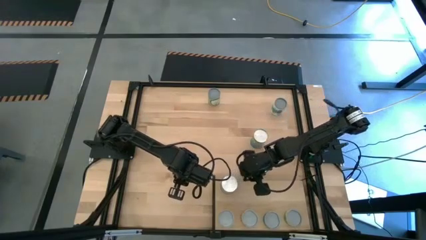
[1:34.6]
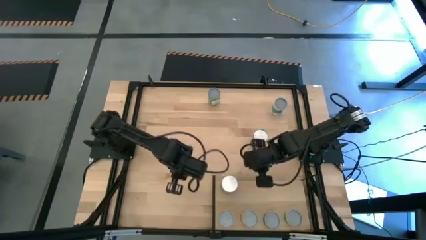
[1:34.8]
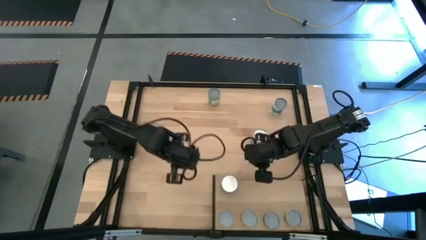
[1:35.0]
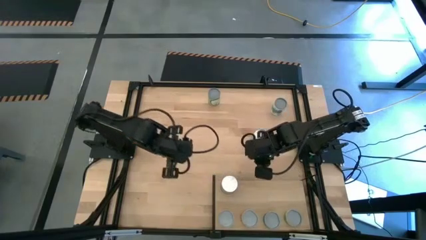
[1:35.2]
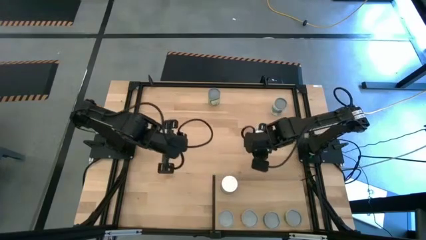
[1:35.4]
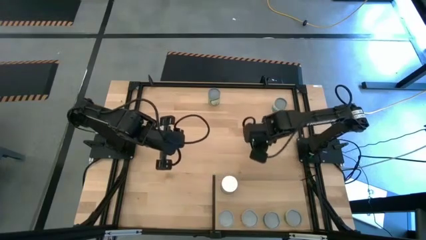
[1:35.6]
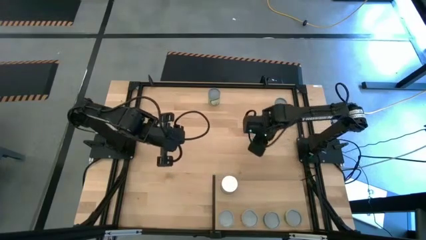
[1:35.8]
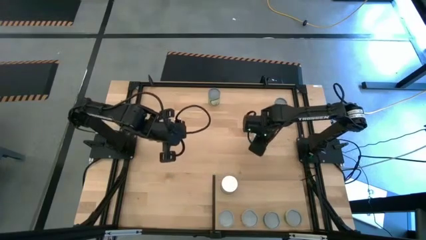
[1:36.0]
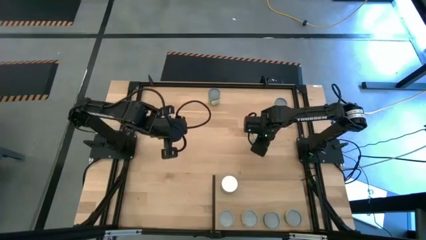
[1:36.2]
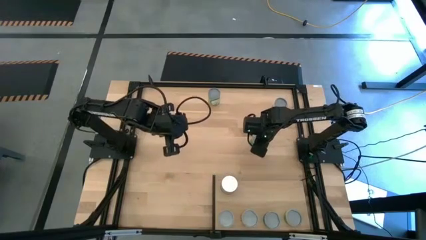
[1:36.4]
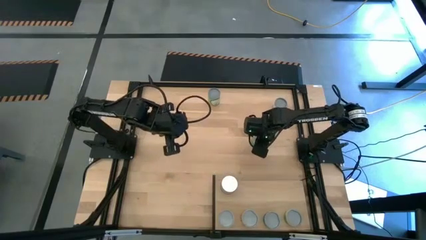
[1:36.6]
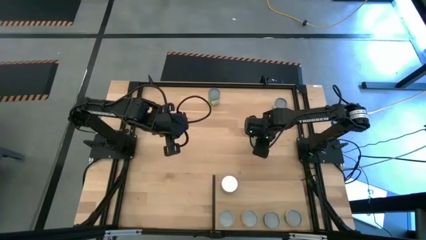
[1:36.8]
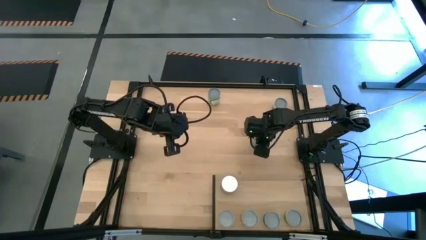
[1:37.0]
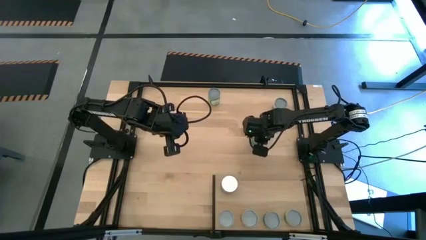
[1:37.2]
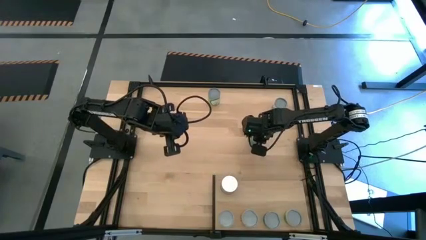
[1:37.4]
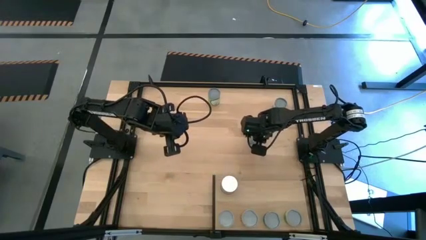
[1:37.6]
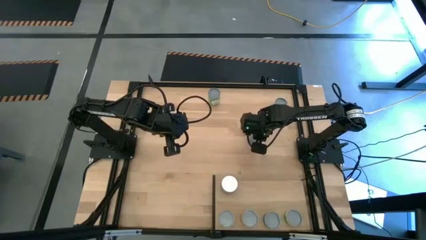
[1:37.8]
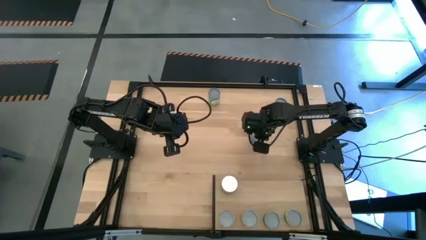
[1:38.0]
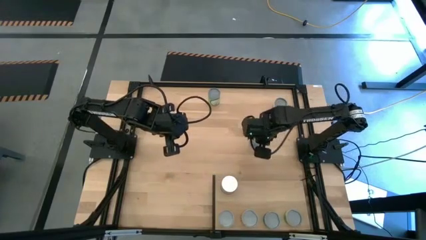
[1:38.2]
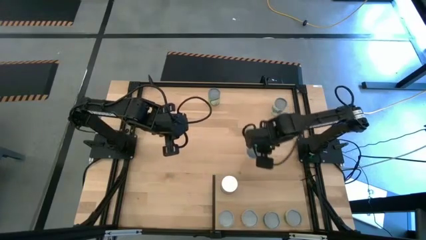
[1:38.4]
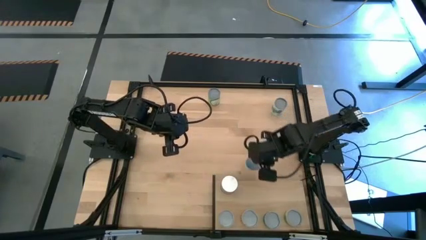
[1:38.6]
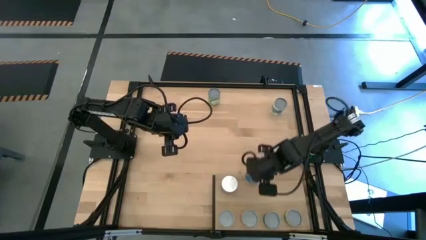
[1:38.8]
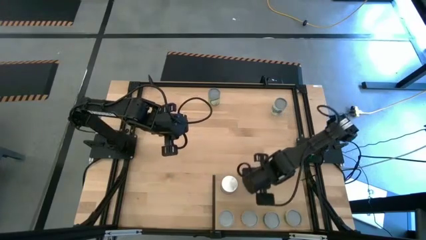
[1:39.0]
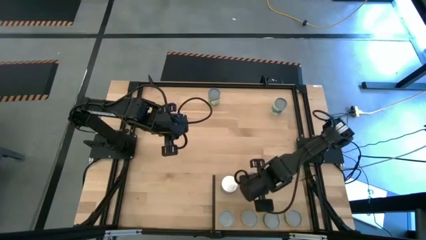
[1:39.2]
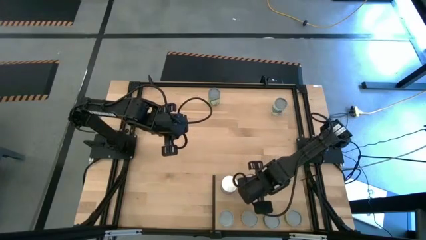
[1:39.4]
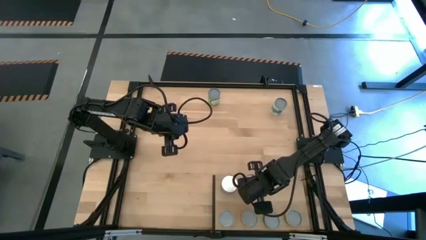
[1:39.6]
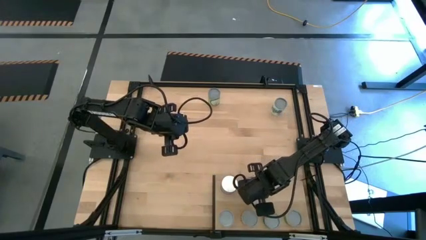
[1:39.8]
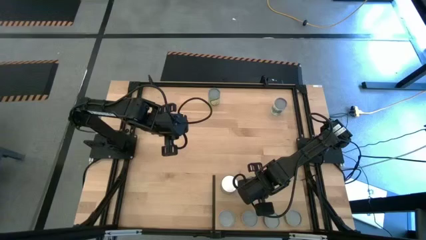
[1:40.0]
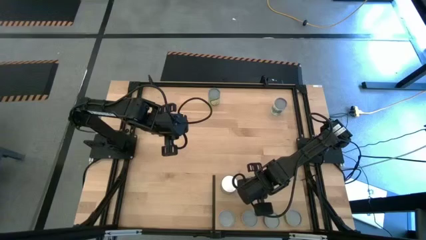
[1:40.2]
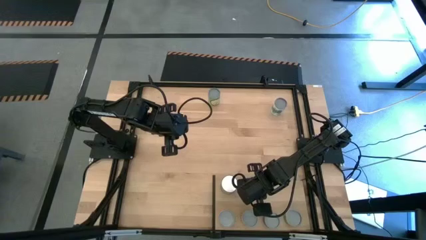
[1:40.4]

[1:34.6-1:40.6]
Task: Pick and place cans onto a shelf
Put the canned cherries on the shelf

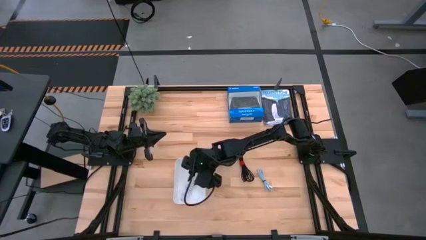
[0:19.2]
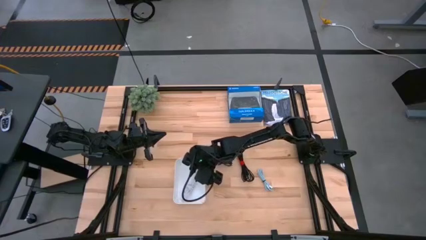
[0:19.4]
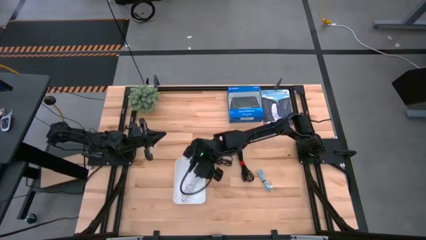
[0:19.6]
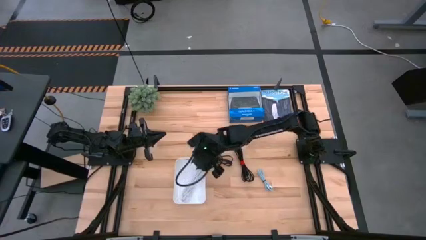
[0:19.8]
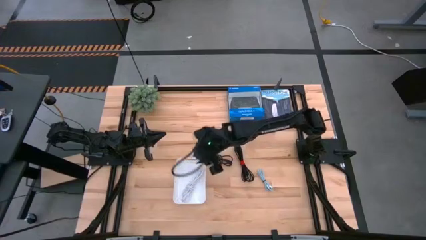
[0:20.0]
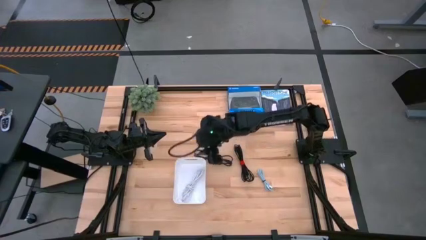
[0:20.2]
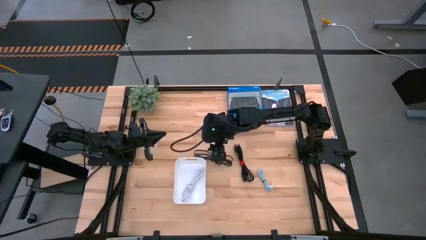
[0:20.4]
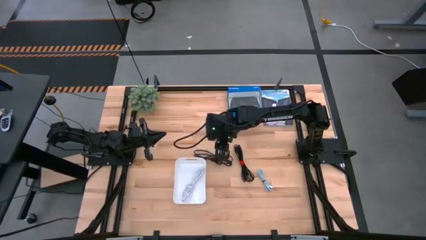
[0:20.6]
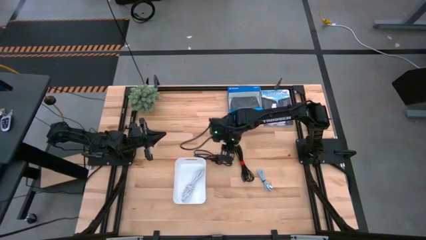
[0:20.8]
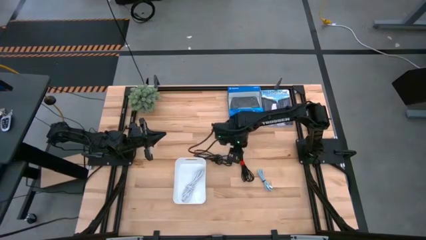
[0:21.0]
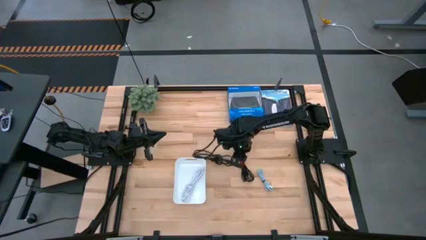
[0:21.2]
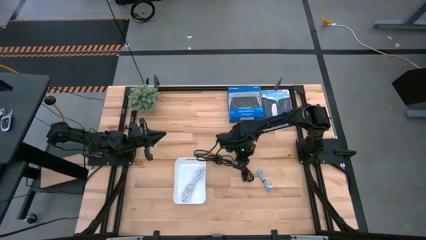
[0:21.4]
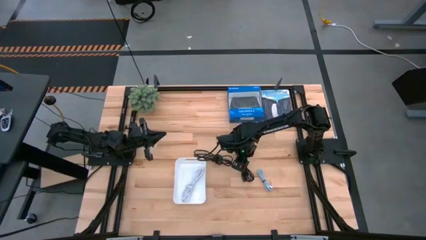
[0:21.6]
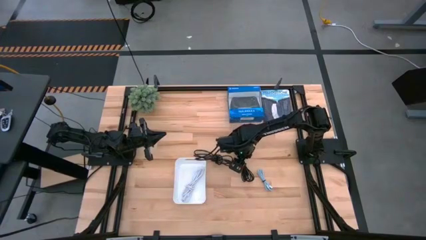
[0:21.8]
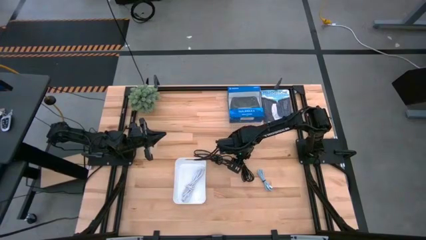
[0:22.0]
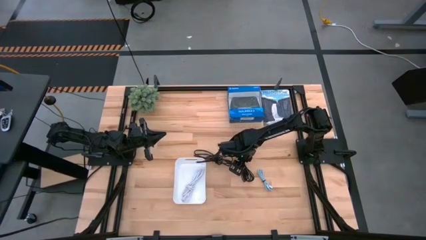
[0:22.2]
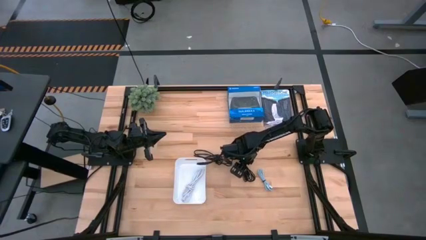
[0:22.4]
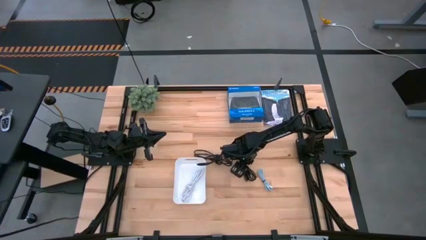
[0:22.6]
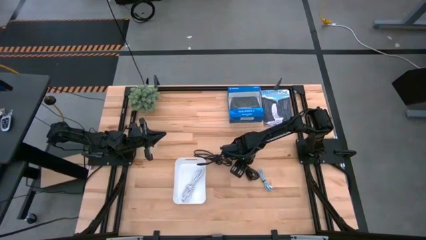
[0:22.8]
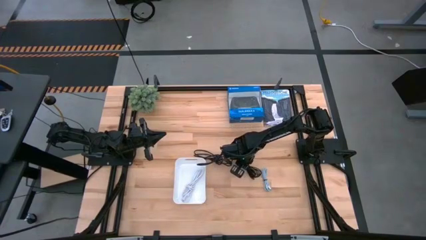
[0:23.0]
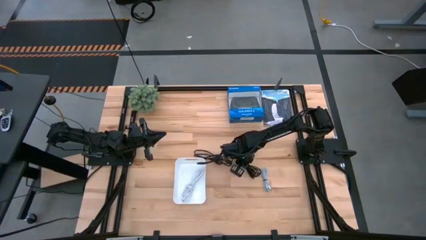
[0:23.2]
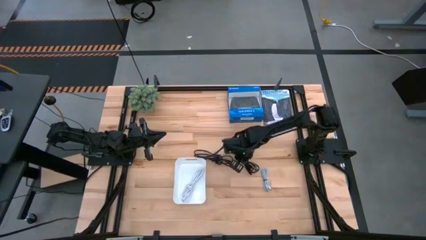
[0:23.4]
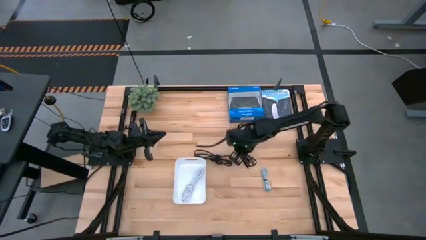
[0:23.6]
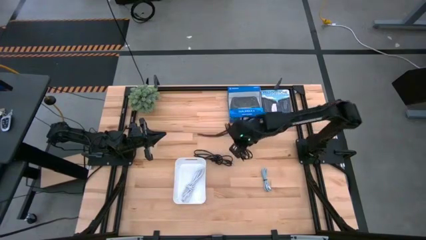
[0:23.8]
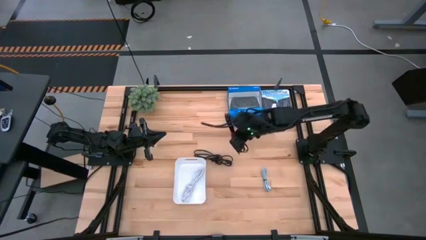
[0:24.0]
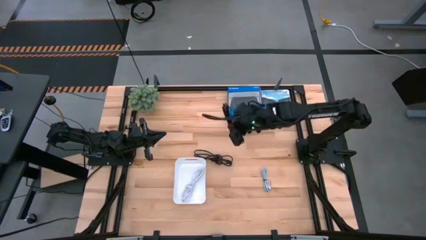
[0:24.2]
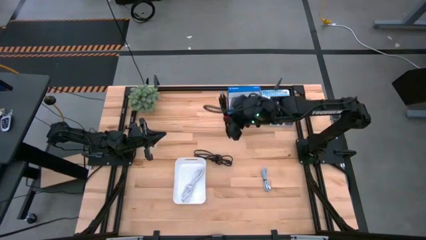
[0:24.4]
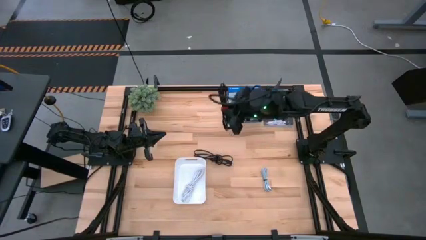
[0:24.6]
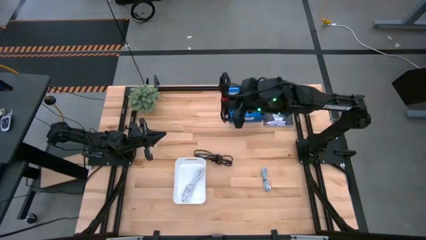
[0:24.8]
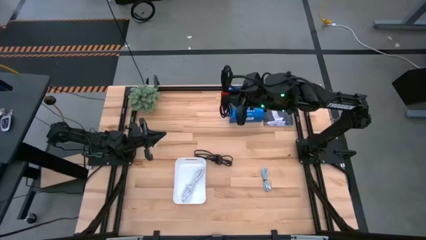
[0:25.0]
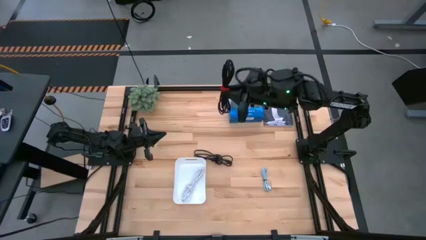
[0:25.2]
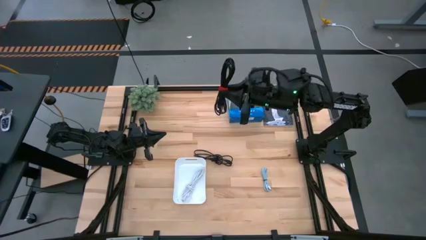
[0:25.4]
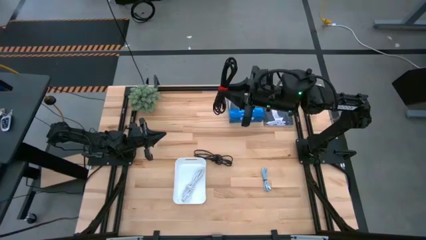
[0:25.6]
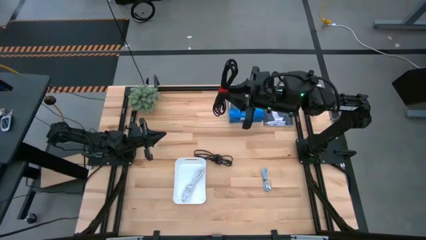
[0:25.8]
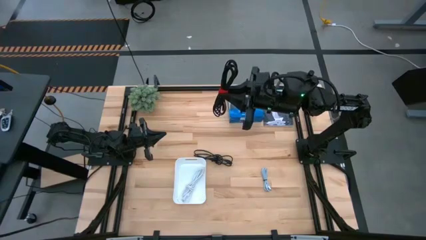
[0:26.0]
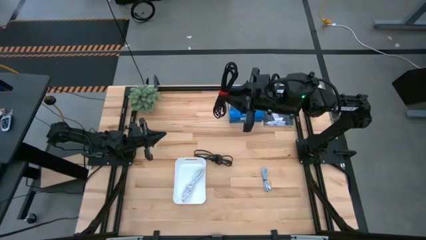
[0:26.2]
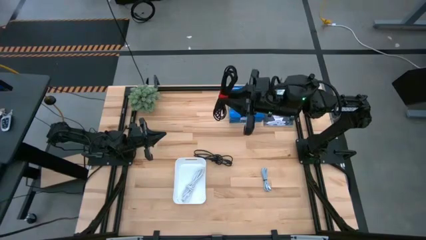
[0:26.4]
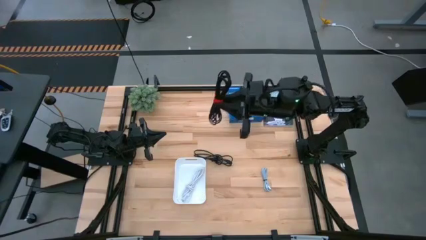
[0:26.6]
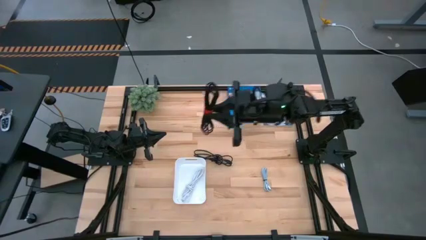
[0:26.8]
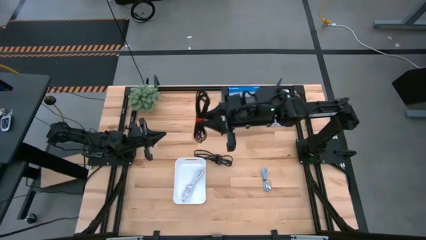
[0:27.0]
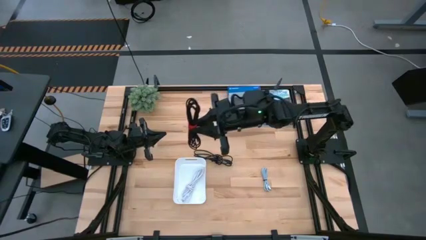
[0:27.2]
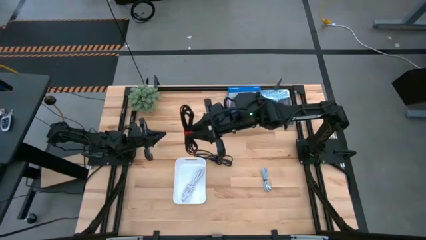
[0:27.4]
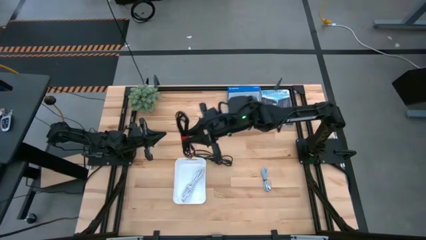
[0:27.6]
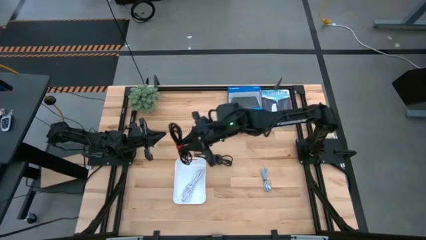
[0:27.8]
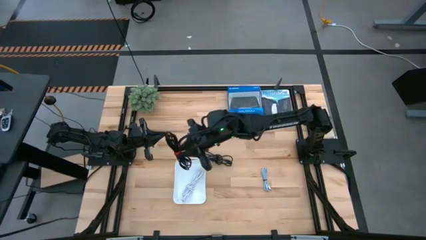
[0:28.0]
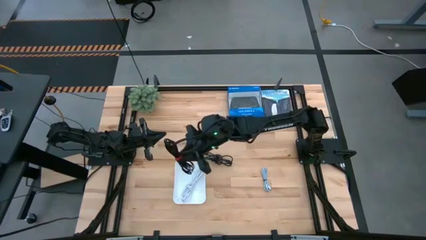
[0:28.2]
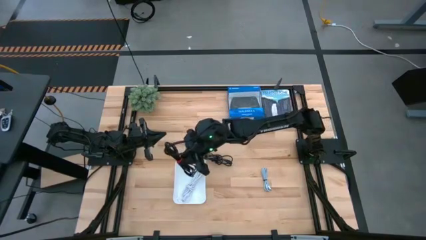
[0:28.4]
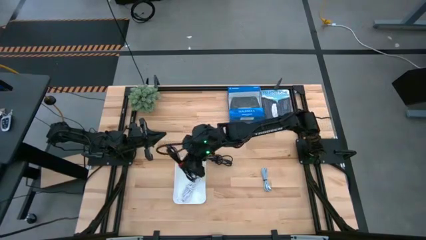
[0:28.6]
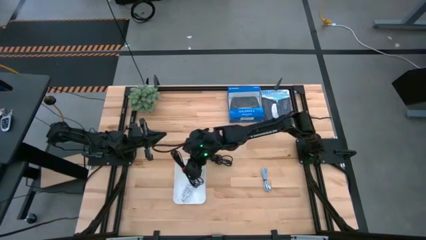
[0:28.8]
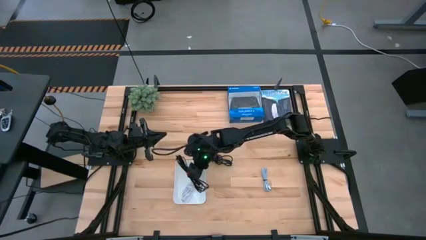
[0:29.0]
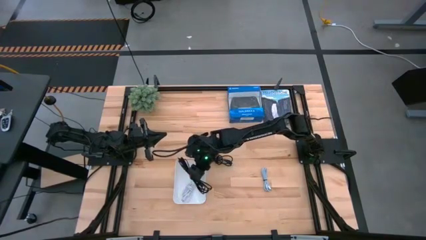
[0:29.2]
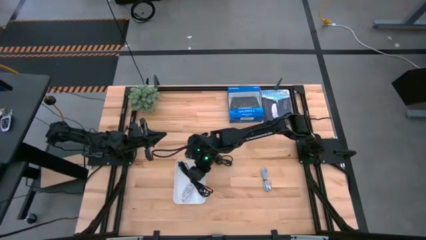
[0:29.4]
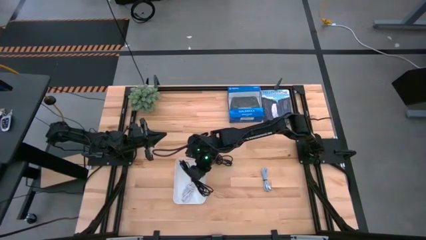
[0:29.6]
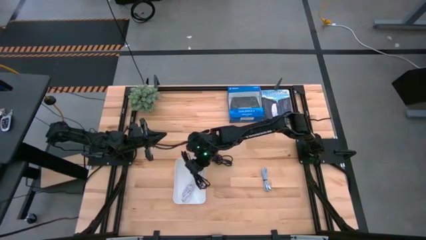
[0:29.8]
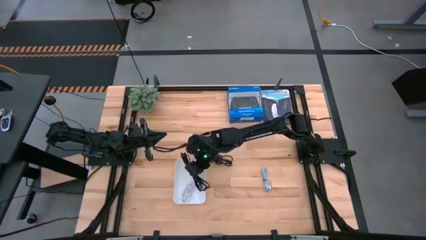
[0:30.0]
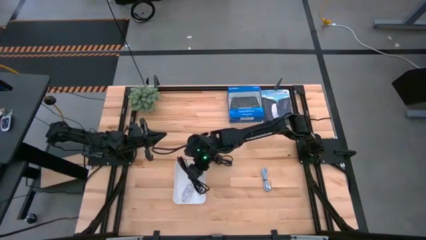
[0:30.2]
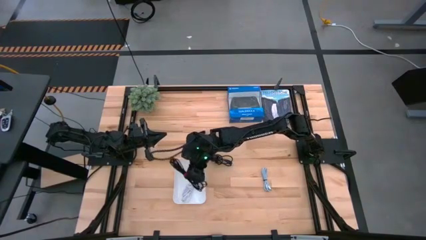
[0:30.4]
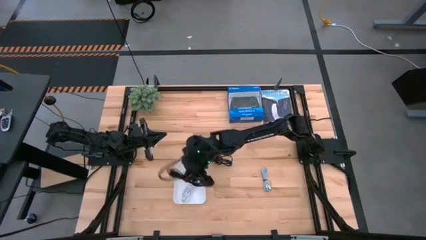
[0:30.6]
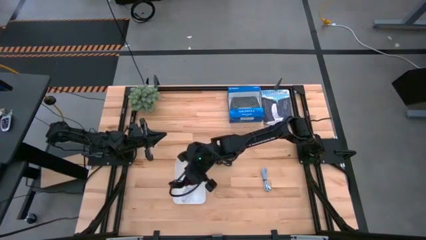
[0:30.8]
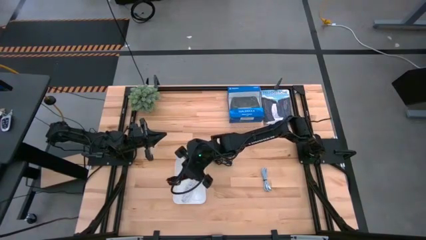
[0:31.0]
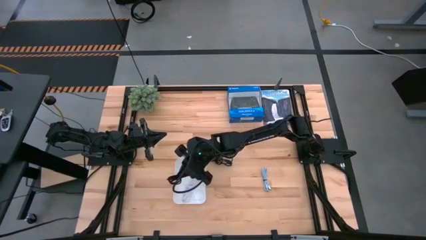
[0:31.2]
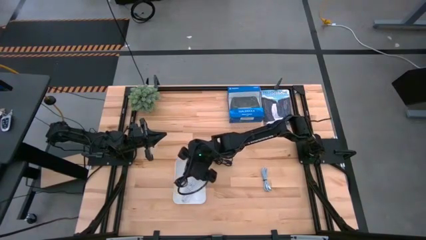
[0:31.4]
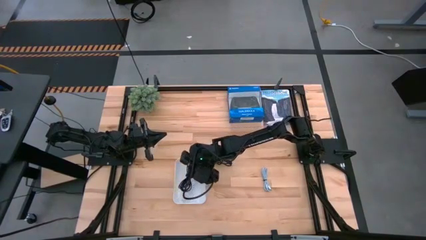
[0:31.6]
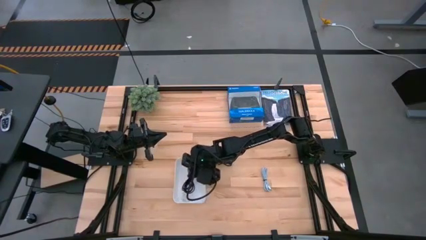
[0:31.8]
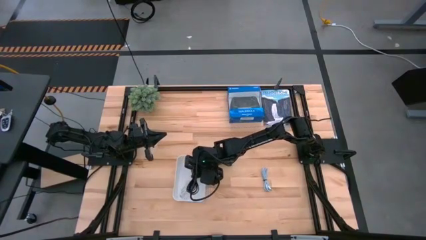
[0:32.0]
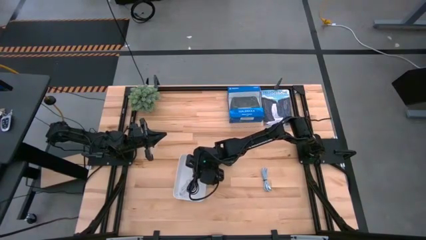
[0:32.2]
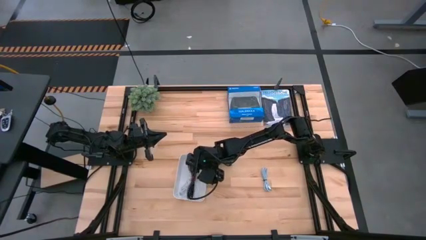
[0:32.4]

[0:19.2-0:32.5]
Task: Pick and place USB-C Cables
Put the right black USB cable into the white bin
